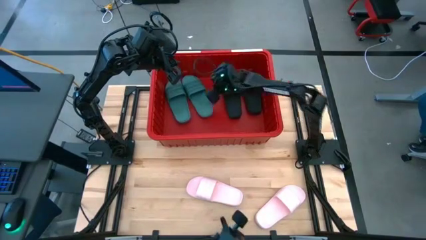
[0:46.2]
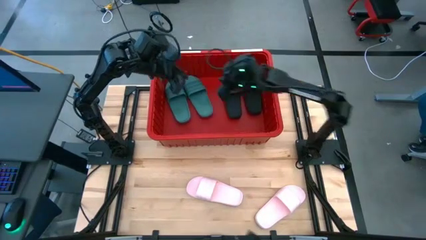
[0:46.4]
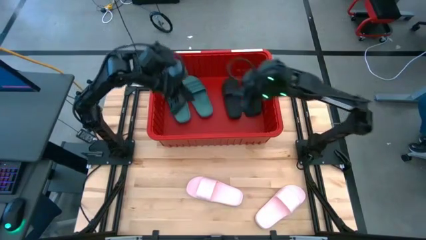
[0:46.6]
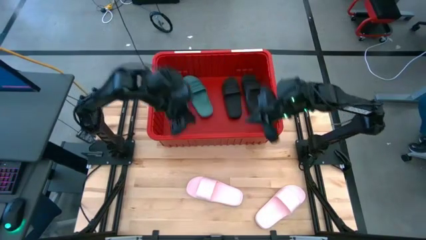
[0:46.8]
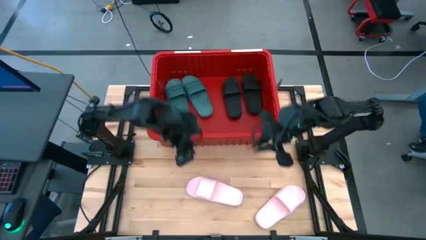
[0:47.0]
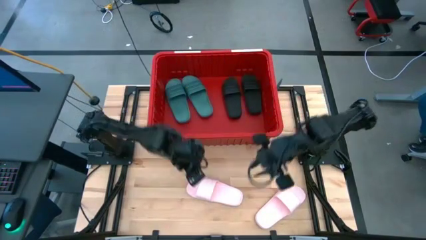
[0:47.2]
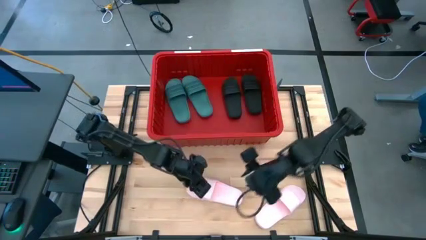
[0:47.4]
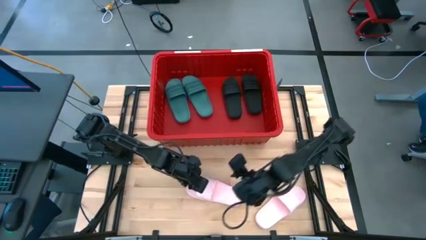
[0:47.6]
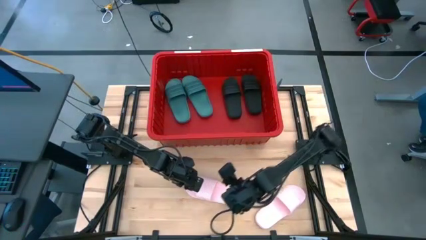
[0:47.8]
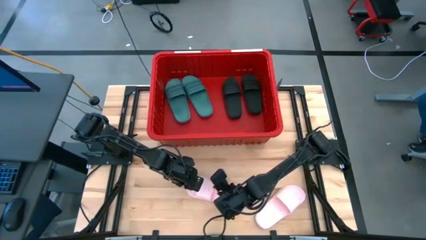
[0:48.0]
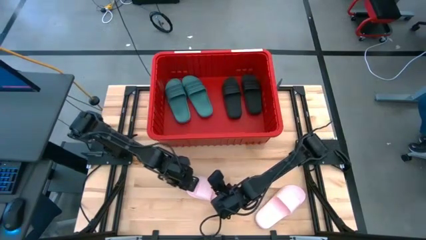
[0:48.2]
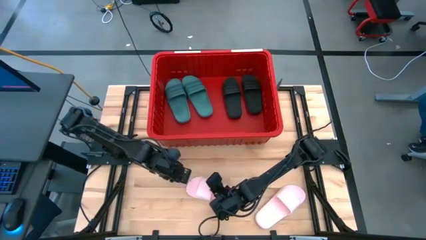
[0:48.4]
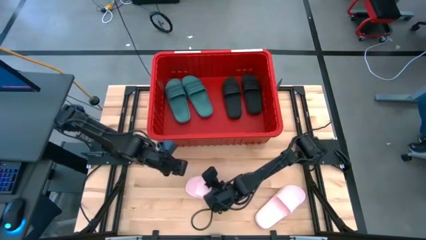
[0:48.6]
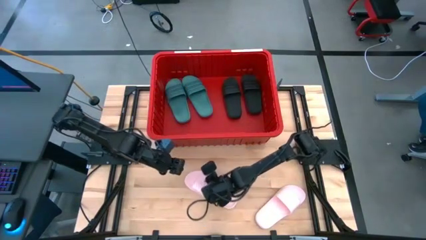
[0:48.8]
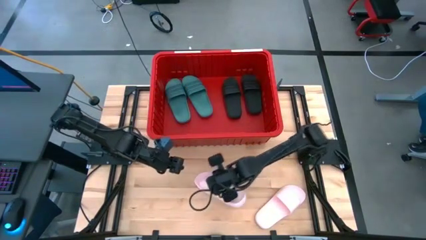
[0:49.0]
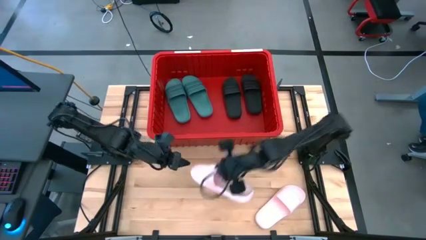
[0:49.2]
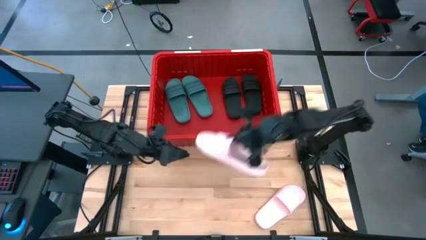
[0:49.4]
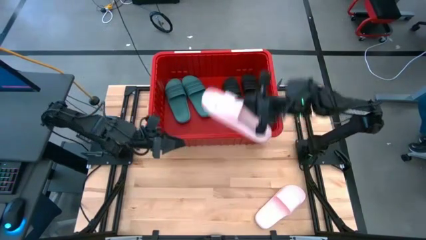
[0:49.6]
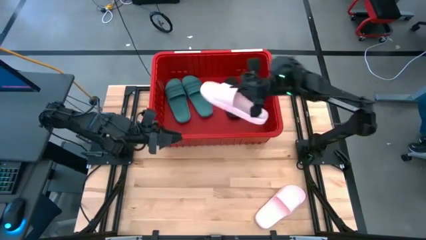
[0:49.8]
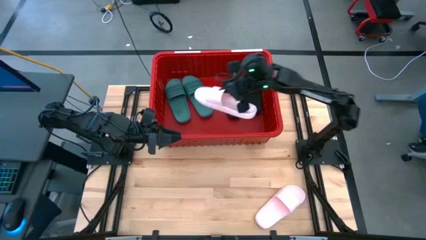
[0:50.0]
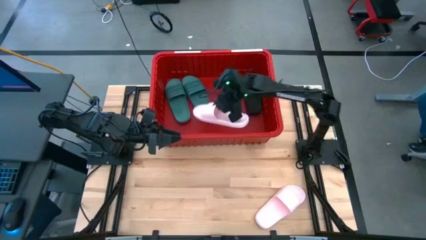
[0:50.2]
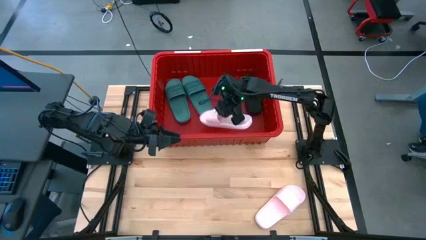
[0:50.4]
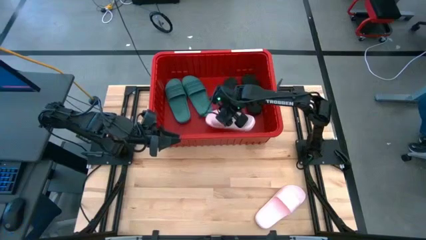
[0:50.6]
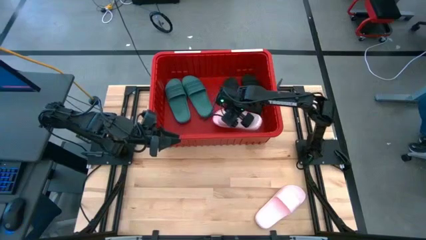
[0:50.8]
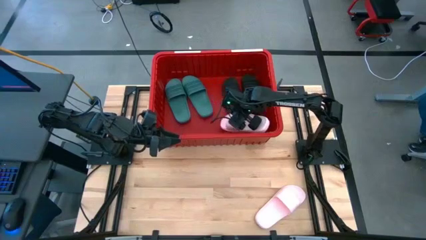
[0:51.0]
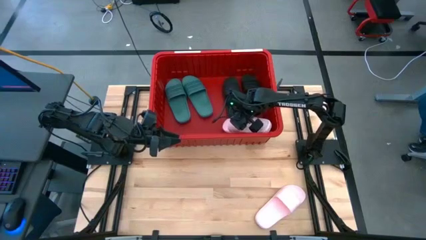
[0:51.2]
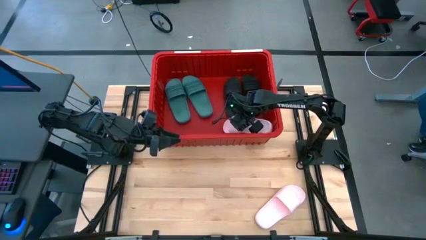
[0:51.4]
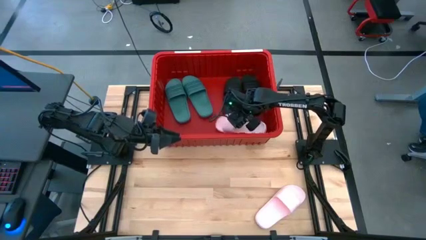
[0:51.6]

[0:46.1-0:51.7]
Task: Pick and place slides into bin
Put the left pink slide into the container

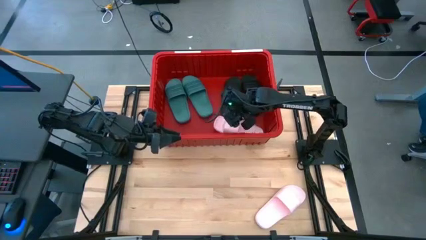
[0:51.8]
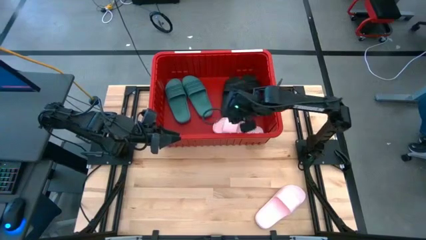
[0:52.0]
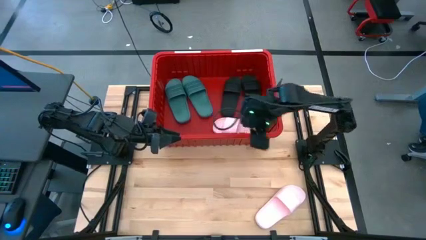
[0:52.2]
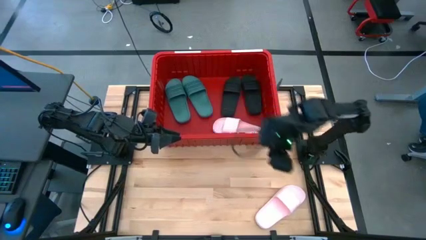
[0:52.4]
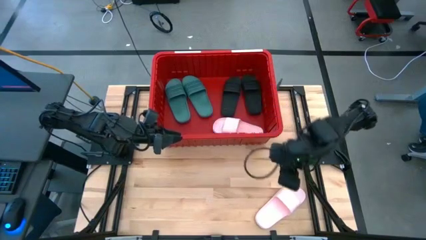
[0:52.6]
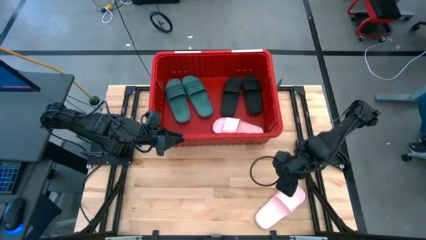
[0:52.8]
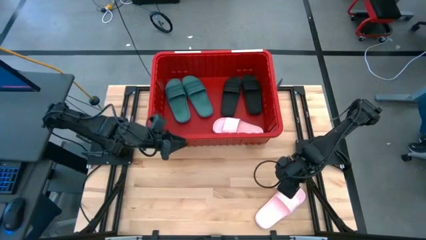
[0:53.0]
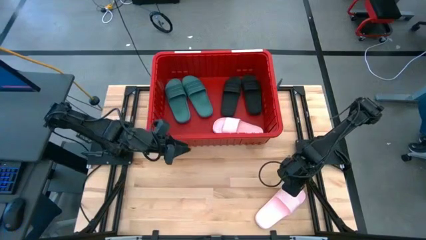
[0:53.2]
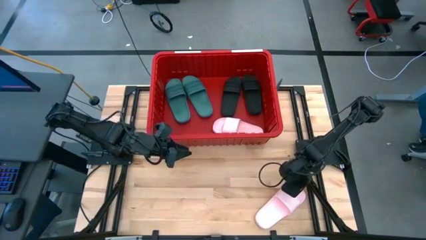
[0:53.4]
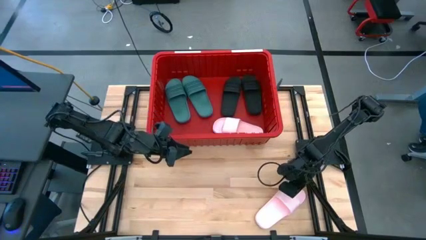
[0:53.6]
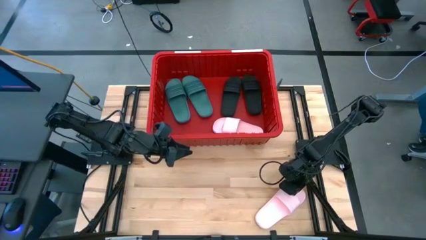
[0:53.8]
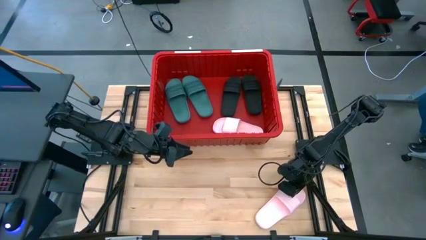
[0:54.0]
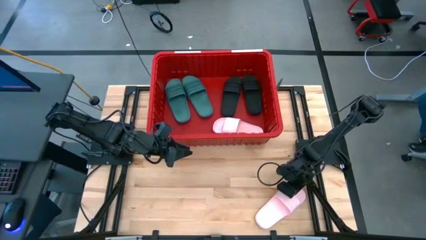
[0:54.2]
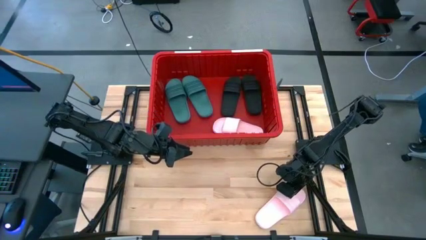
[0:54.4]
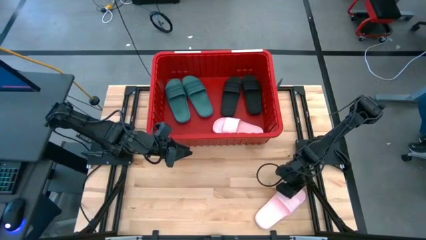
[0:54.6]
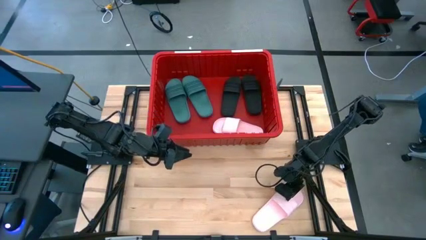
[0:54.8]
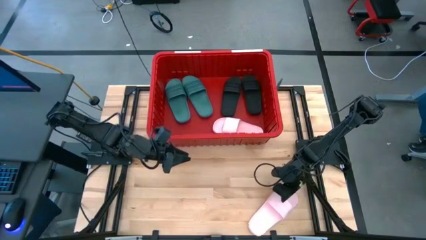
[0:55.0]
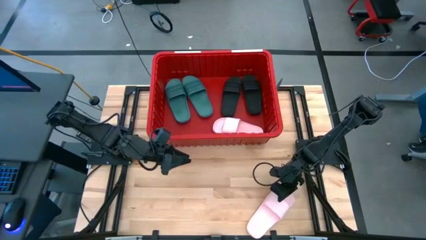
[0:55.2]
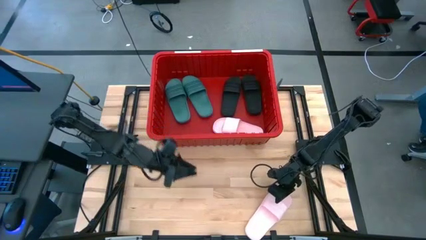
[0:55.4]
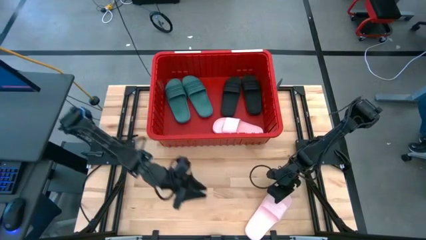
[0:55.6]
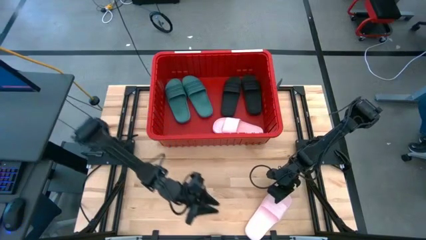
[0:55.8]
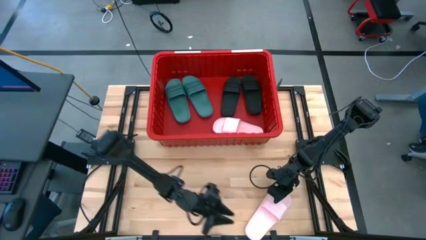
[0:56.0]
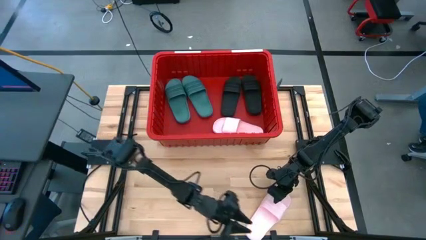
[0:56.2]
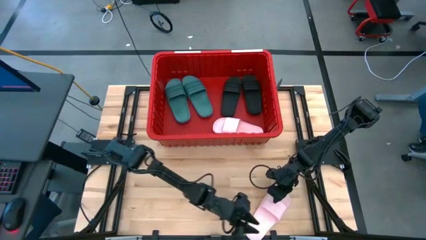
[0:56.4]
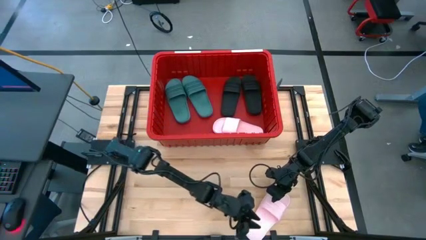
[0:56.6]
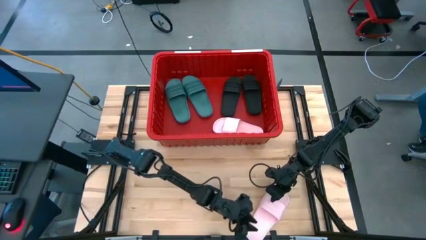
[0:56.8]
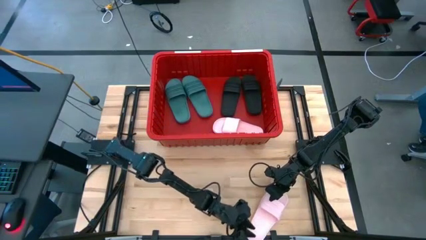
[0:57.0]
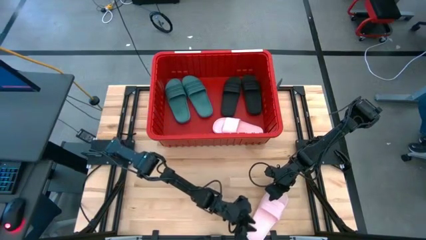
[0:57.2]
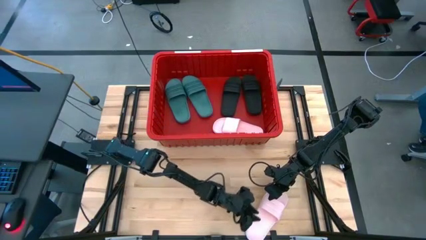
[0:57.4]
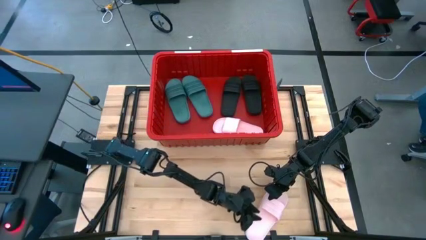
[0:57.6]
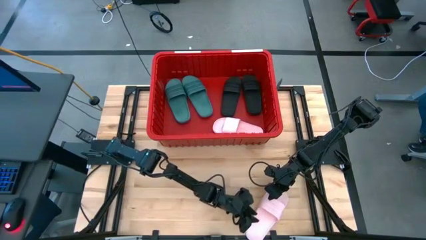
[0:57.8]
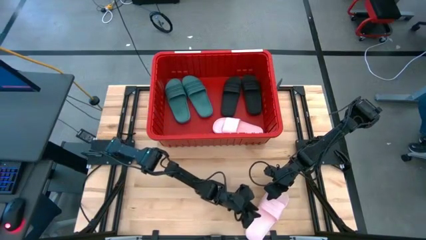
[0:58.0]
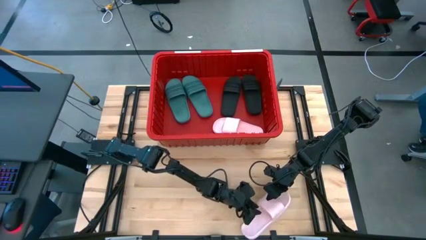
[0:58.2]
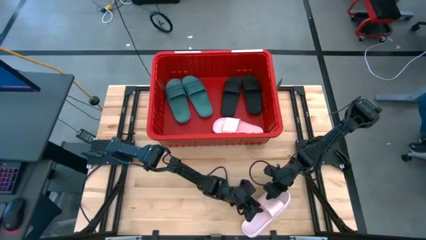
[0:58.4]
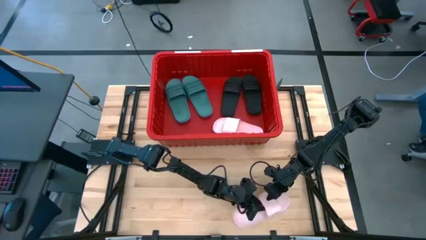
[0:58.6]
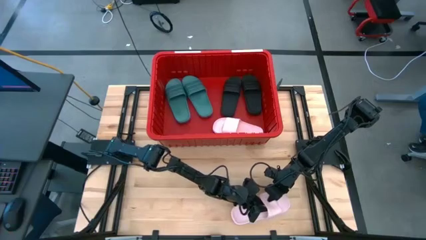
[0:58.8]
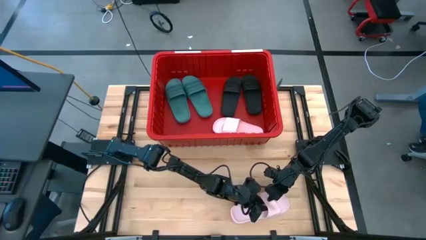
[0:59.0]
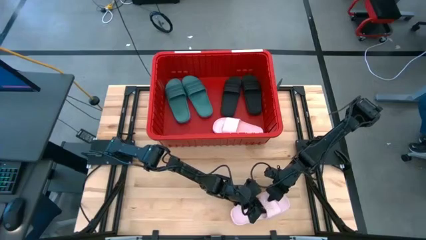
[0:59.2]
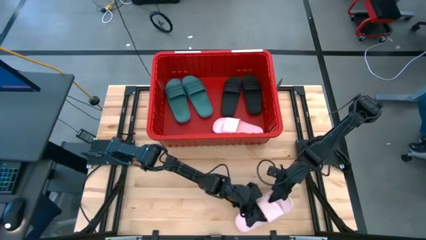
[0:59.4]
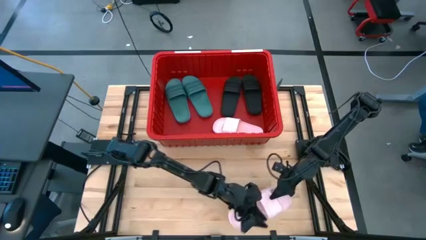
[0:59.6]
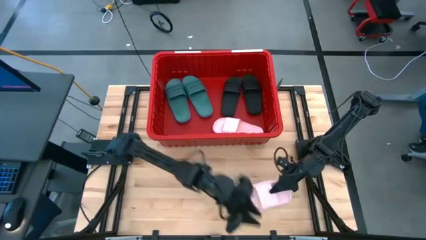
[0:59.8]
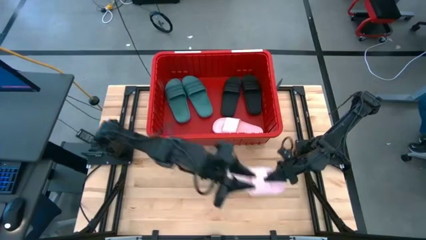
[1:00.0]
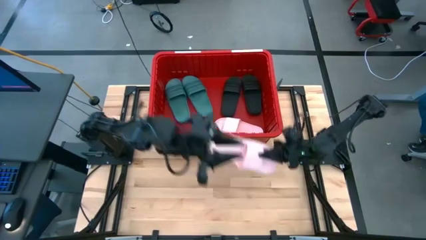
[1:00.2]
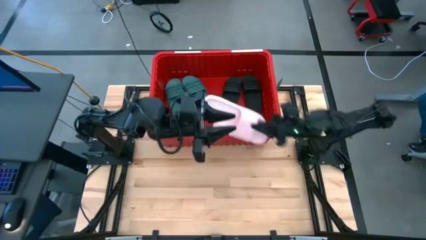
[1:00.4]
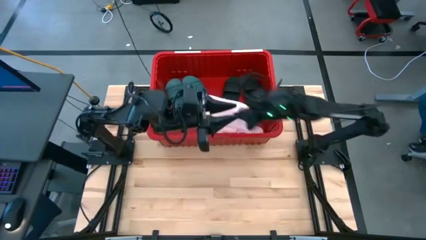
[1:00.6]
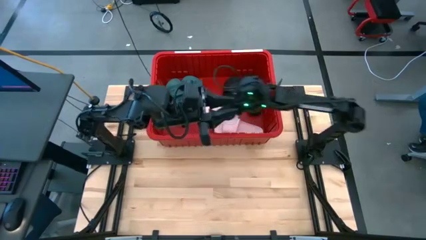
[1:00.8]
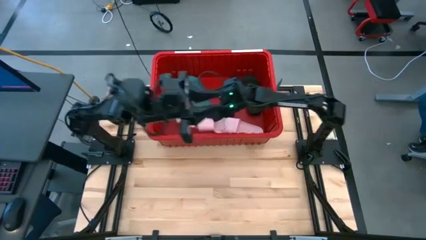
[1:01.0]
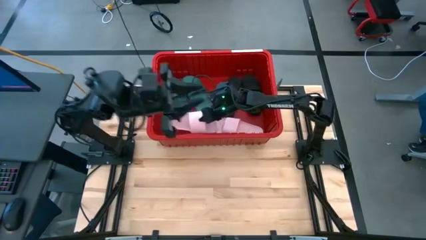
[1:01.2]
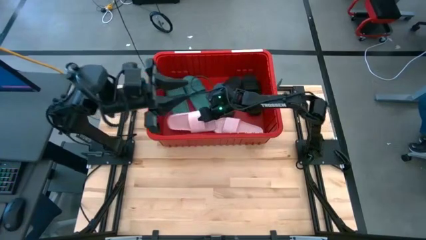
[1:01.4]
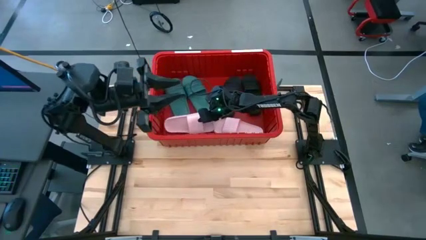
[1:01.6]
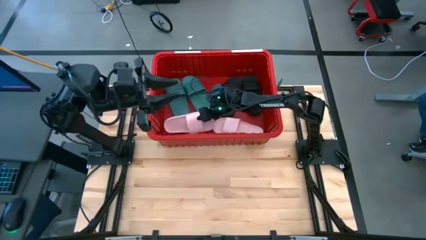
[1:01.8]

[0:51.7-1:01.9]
Put the pink slide into the container
